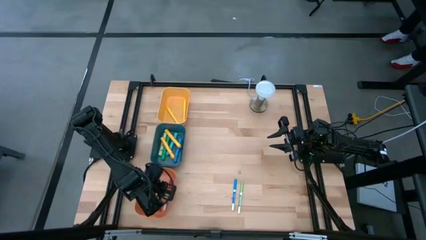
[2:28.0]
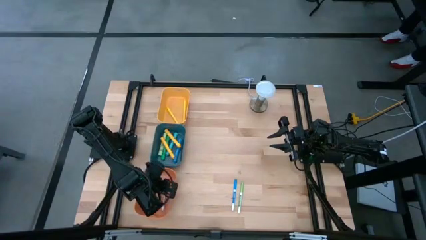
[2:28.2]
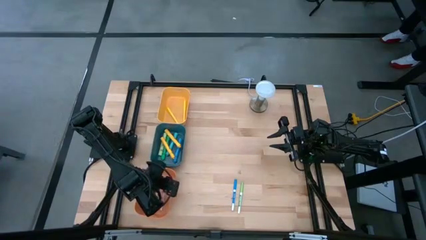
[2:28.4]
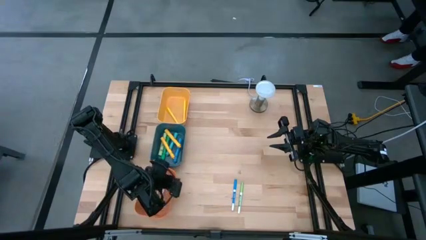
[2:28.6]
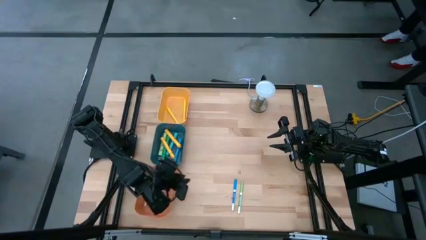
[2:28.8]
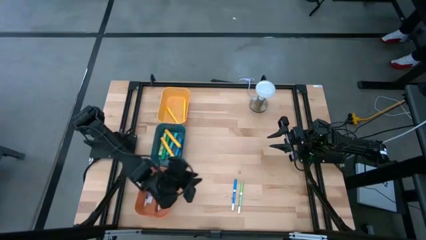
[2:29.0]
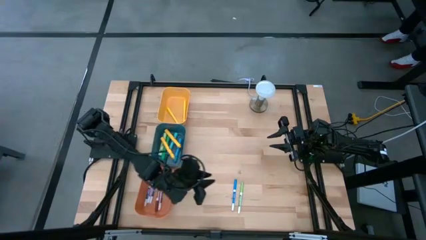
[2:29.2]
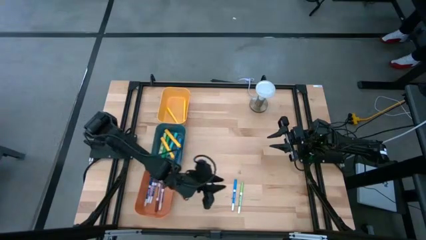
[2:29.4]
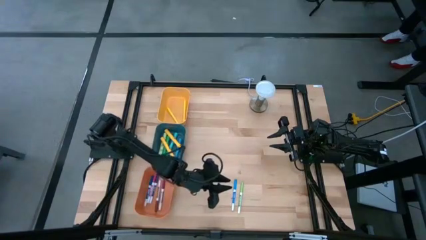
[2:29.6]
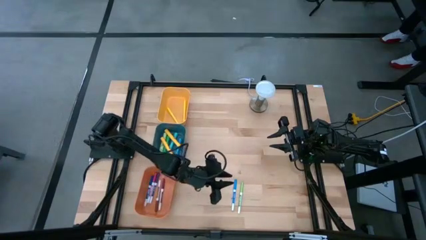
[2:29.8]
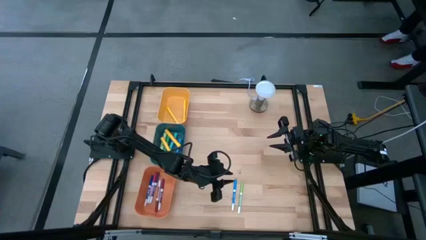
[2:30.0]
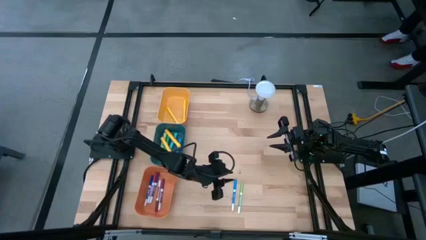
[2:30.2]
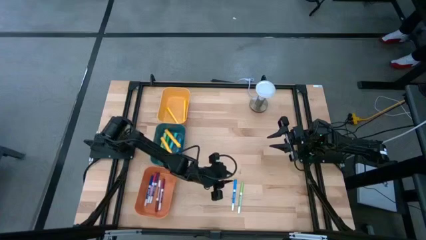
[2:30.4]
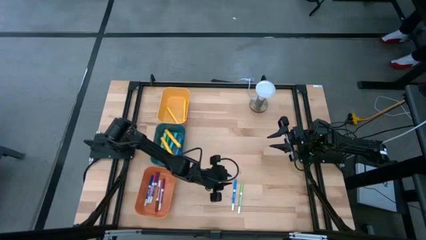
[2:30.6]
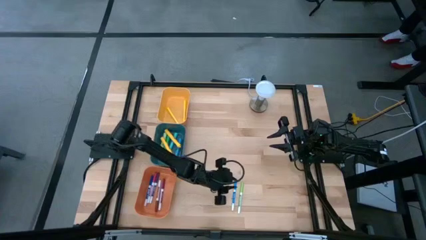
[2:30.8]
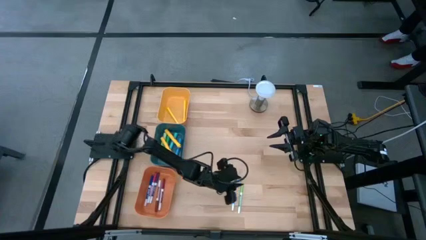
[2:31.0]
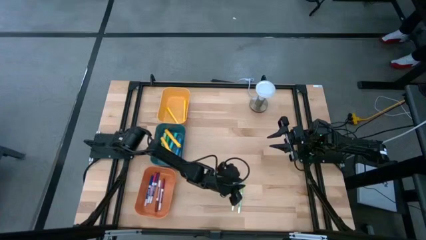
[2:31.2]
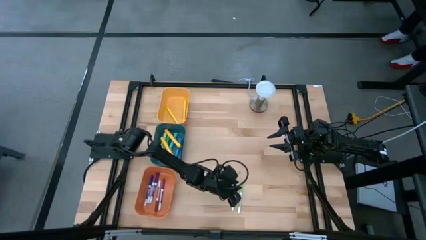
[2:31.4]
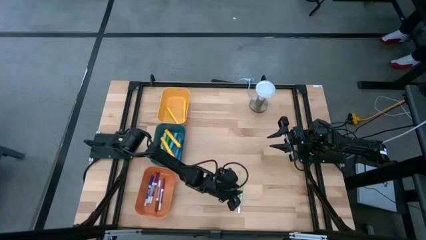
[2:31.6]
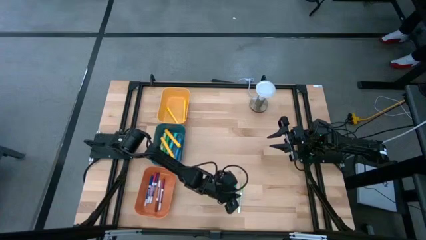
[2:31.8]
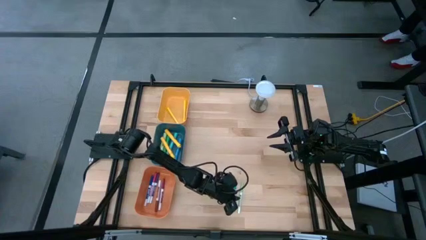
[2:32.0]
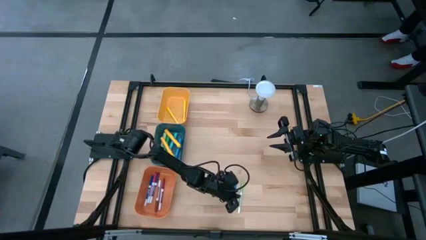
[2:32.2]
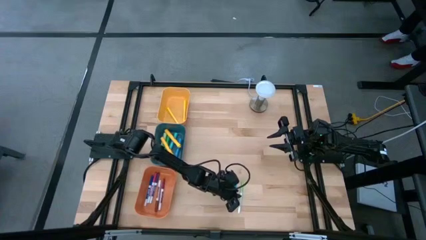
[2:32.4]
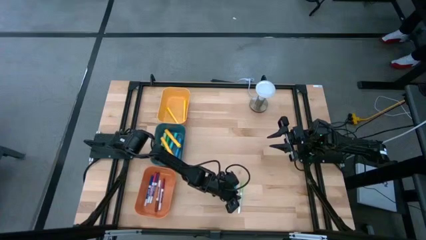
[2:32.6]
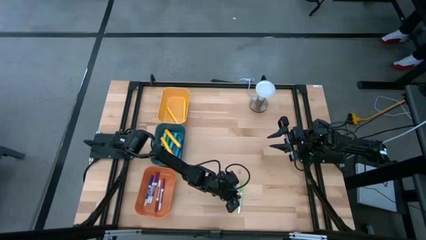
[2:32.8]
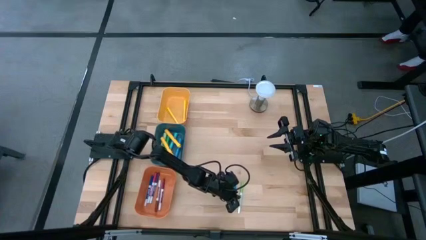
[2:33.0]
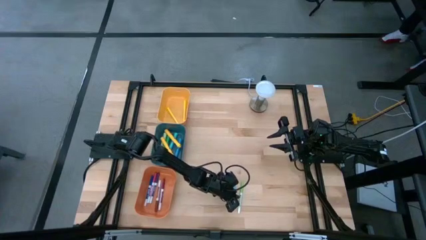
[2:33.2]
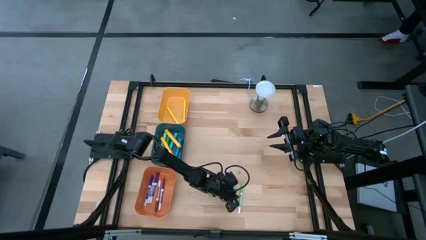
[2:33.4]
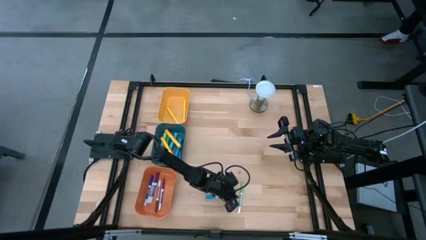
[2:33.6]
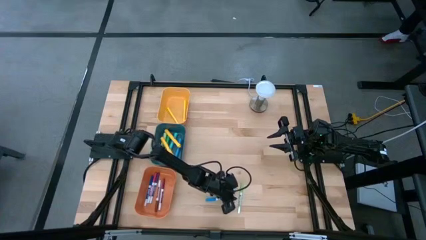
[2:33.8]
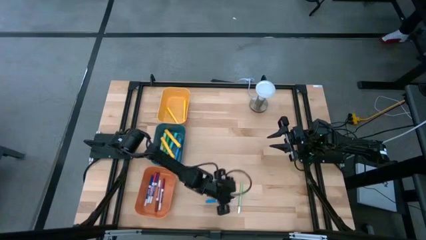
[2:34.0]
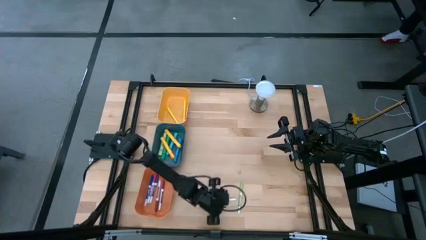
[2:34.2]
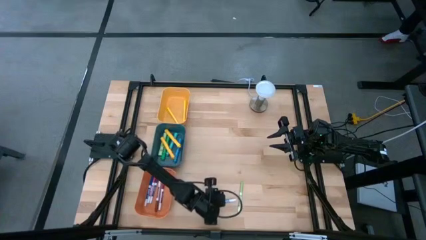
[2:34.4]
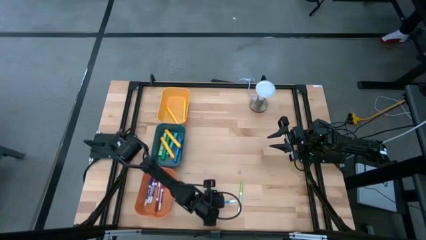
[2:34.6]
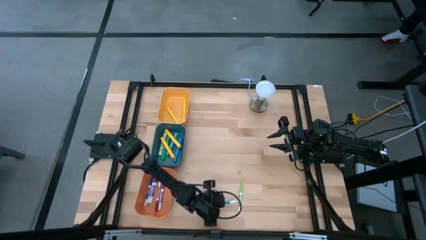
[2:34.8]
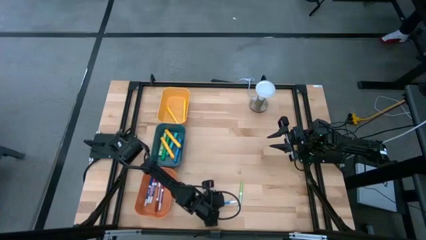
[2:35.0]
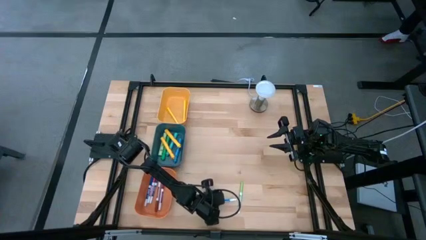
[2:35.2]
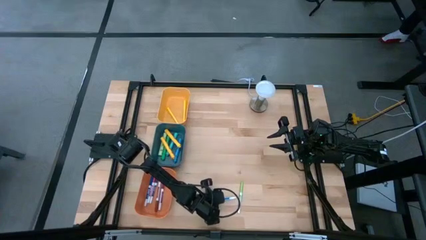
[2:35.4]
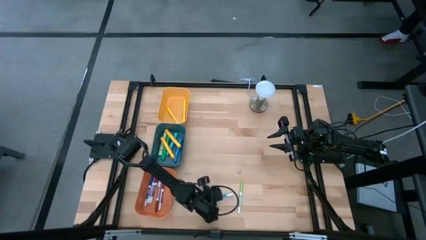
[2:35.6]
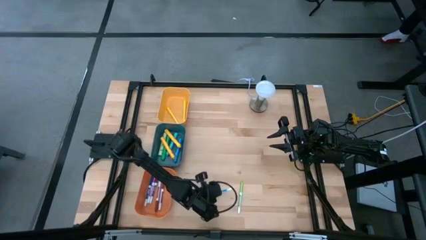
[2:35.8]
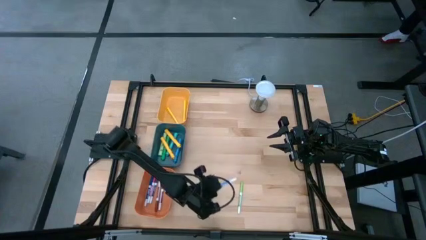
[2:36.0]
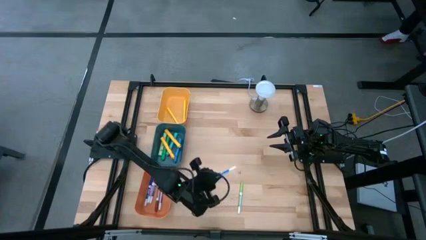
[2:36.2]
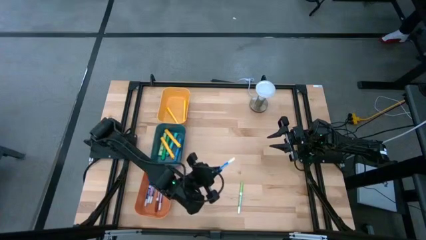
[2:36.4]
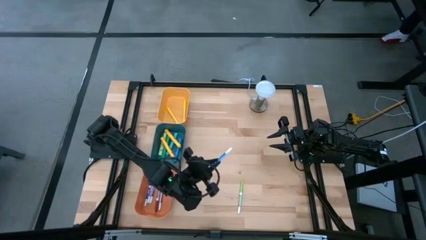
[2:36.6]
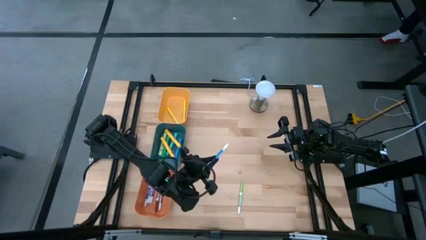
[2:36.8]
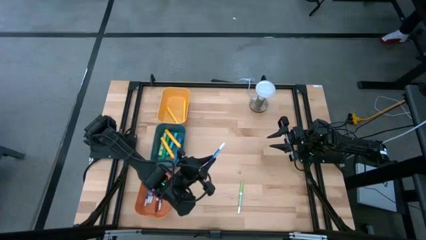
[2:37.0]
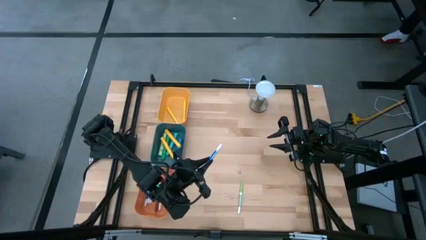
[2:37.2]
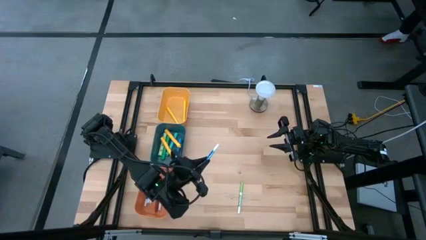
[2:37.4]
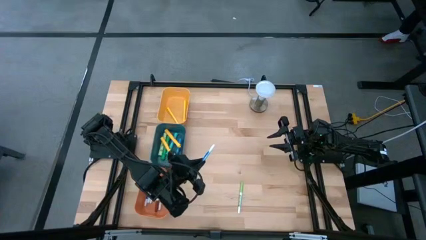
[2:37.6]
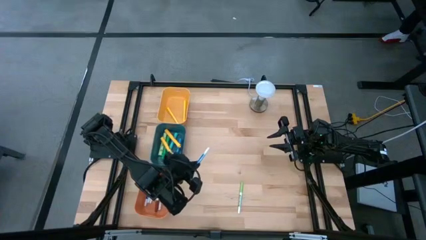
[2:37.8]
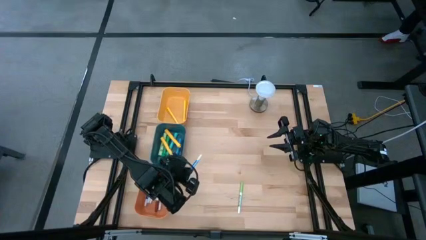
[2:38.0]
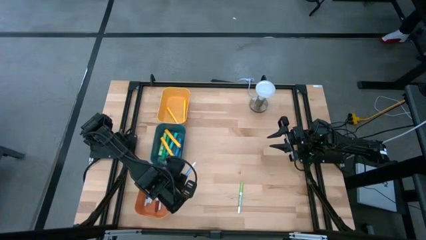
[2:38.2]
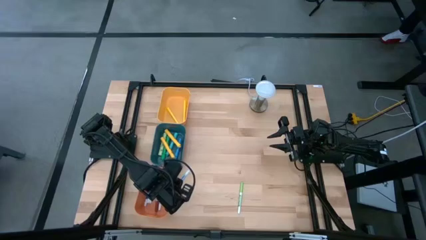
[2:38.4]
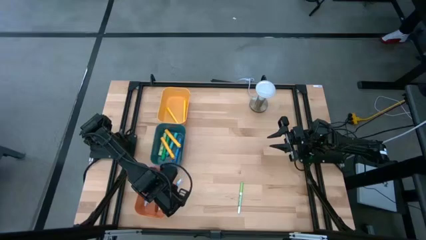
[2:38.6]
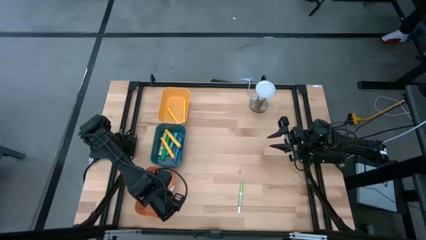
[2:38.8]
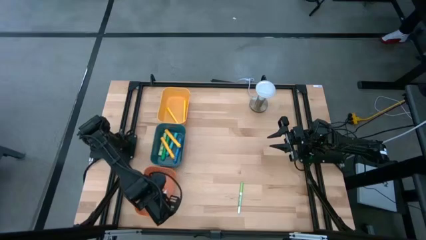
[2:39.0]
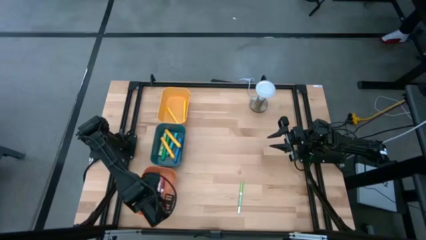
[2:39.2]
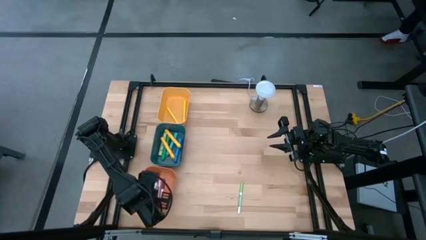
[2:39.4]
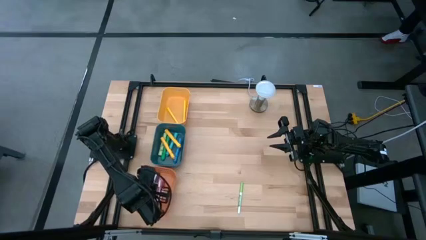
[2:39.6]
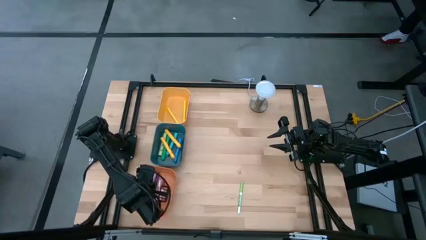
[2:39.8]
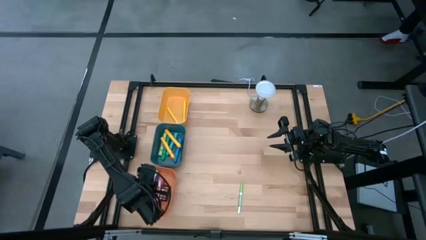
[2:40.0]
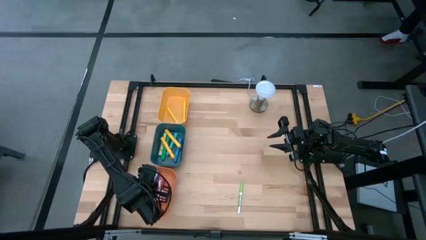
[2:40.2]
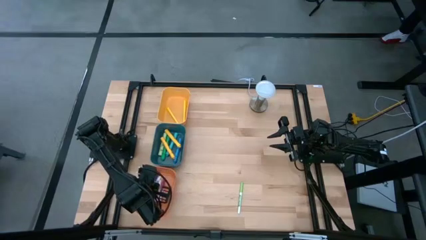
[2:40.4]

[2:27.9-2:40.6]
Task: Pick & Place Markers
Put the light blue marker pen into the orange bin

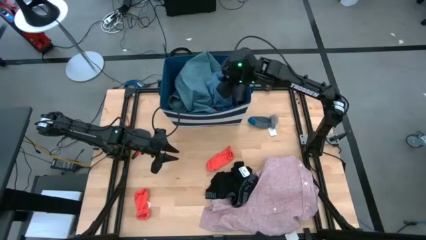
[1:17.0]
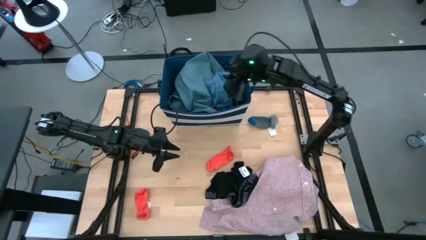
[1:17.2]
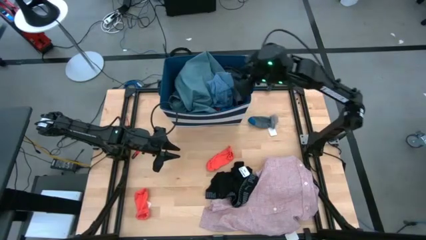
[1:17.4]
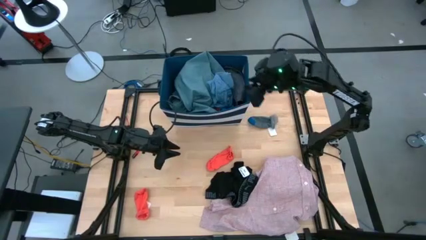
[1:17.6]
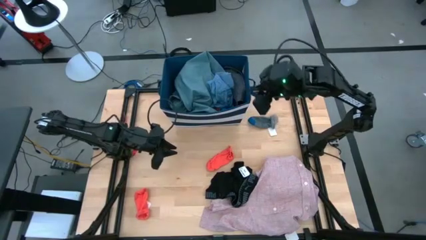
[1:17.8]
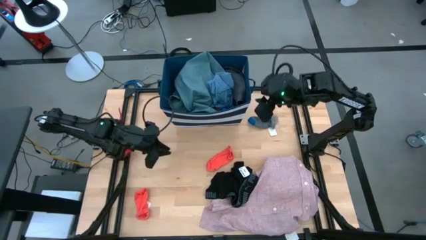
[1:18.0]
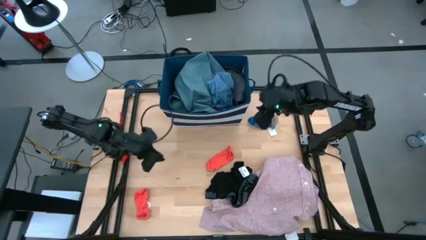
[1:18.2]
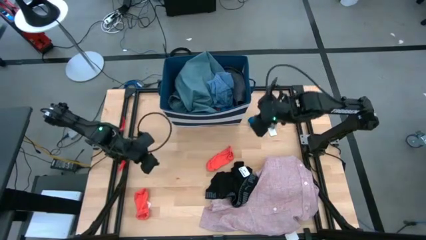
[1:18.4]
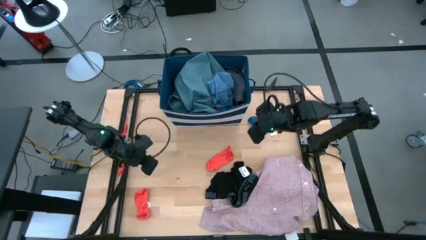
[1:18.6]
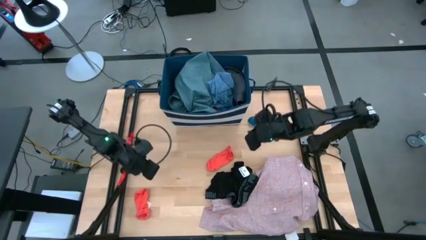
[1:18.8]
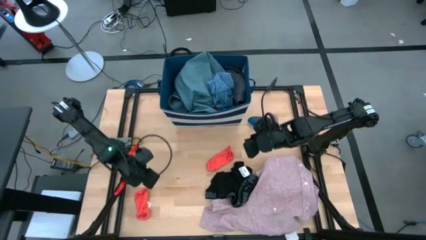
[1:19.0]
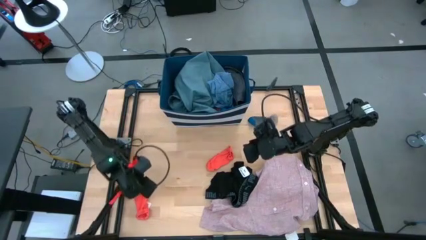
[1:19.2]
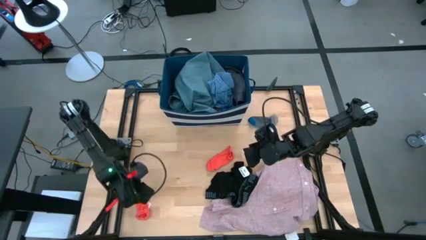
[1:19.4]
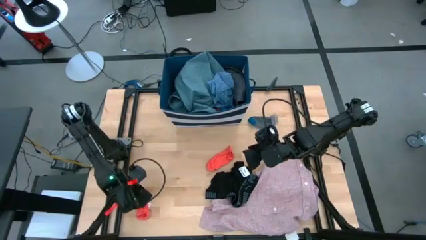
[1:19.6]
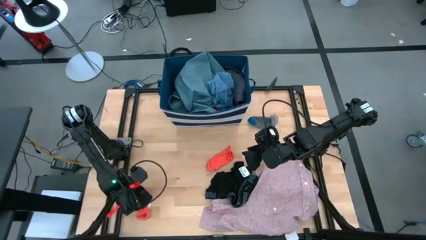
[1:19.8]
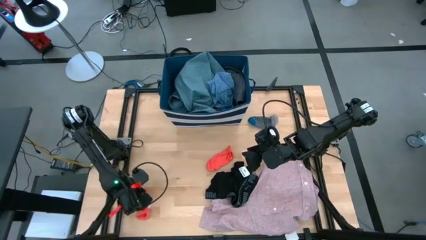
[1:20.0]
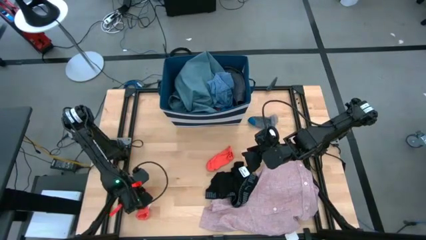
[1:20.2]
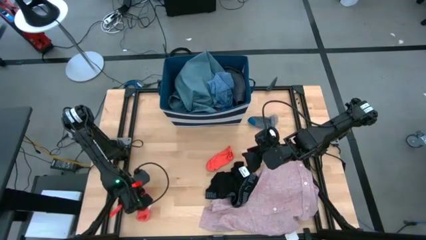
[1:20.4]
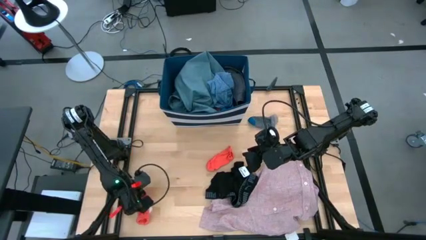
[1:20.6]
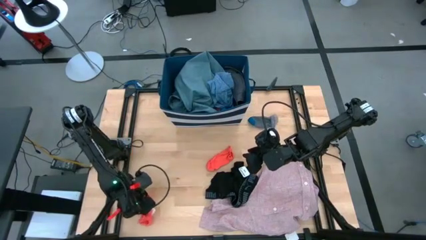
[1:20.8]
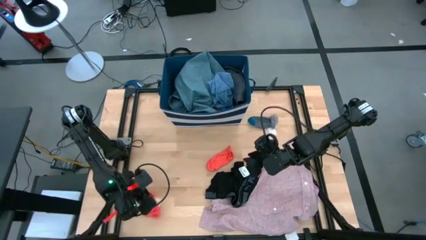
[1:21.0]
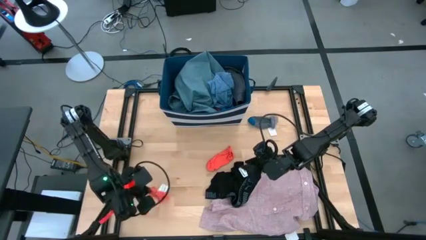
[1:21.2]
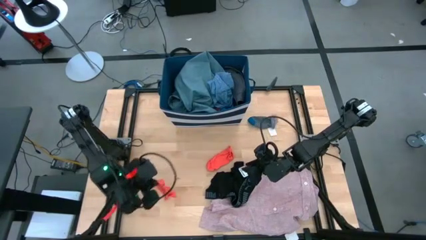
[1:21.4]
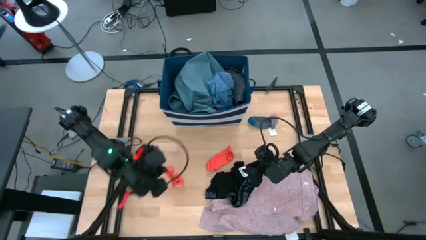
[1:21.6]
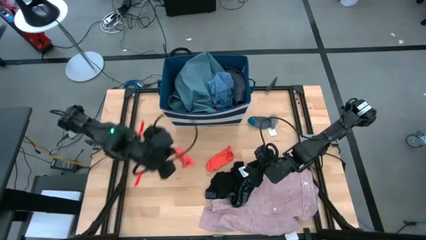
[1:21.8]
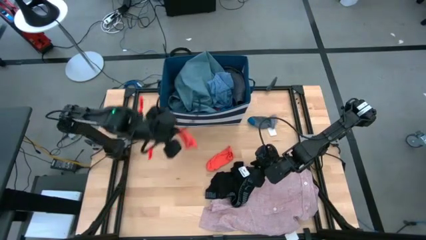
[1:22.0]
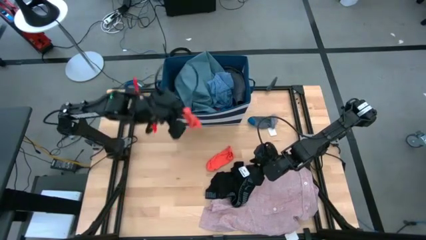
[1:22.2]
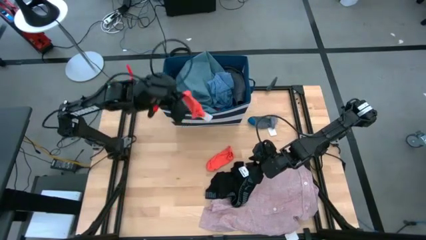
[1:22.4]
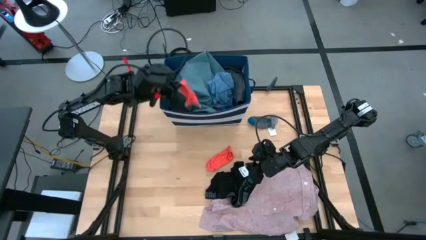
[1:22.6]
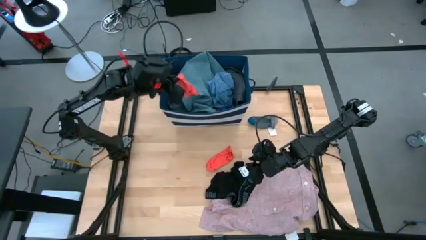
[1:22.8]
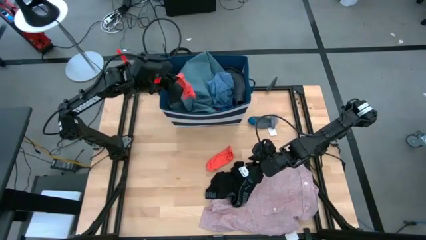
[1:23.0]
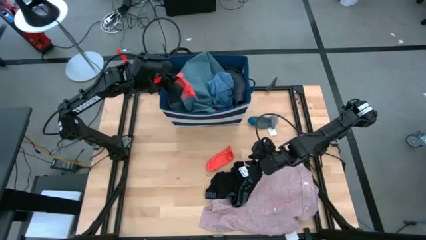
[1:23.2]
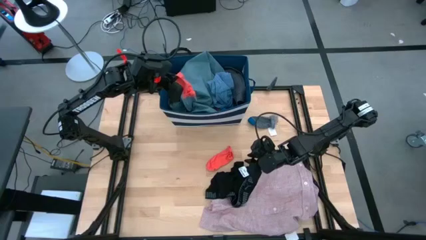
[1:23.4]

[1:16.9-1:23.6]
Task: Sort clothes
Put the bottom orange sock into the blue bin
